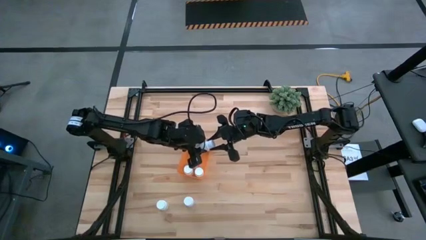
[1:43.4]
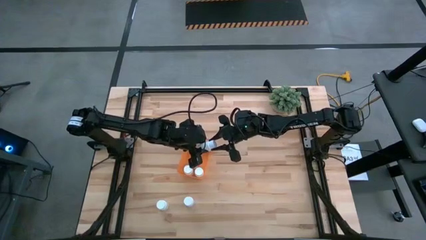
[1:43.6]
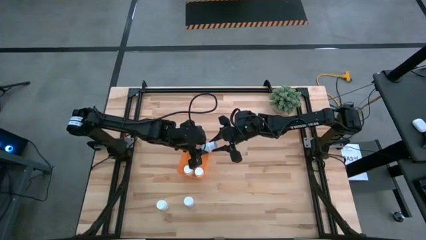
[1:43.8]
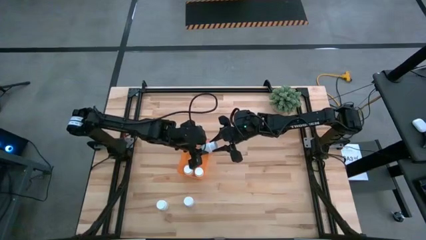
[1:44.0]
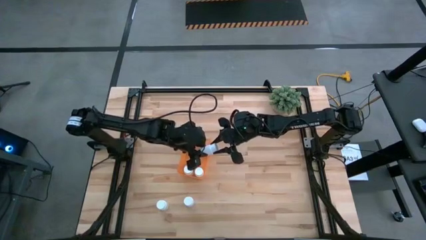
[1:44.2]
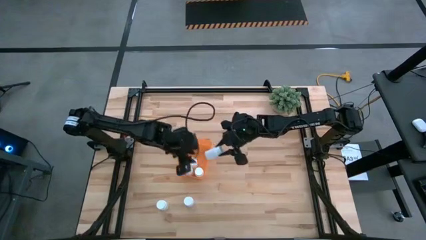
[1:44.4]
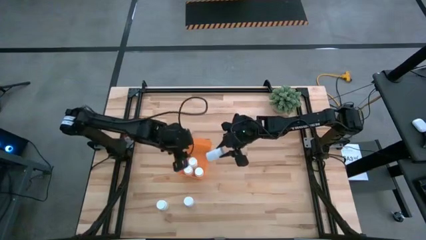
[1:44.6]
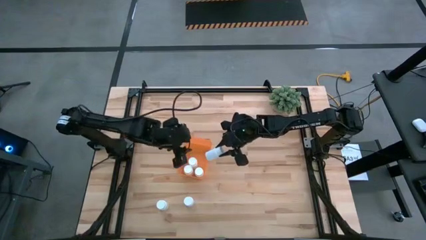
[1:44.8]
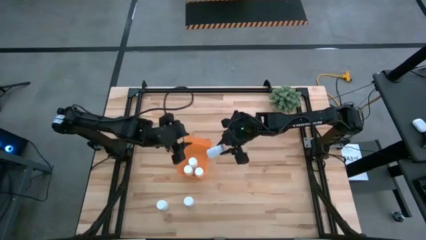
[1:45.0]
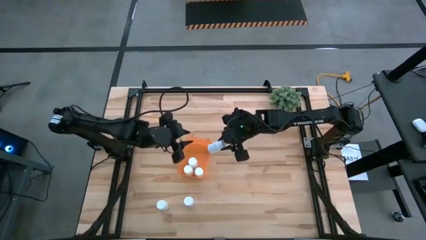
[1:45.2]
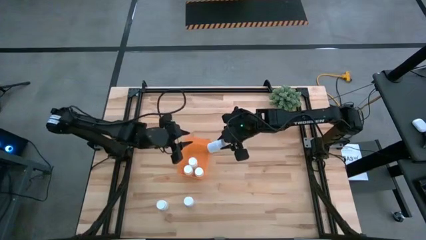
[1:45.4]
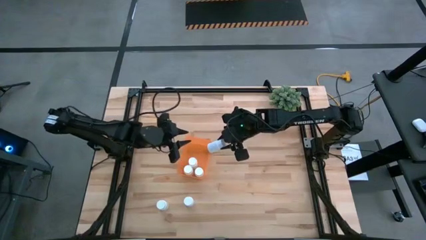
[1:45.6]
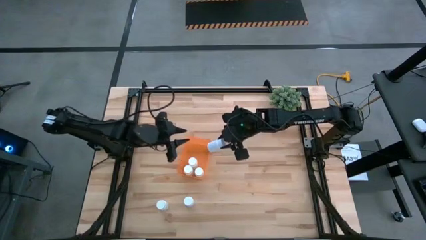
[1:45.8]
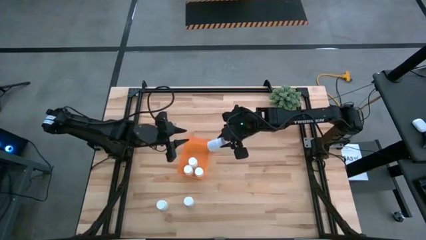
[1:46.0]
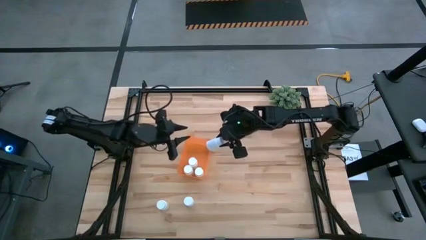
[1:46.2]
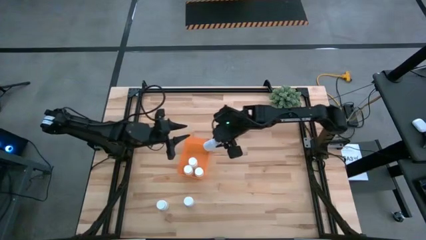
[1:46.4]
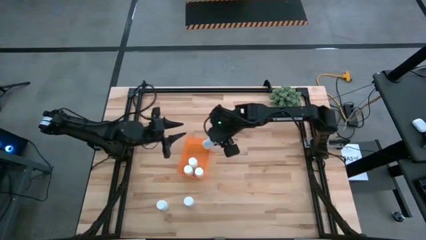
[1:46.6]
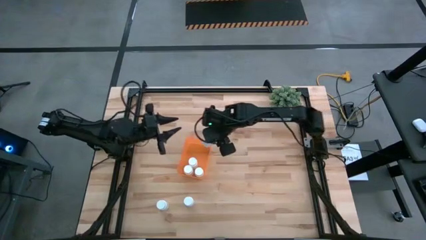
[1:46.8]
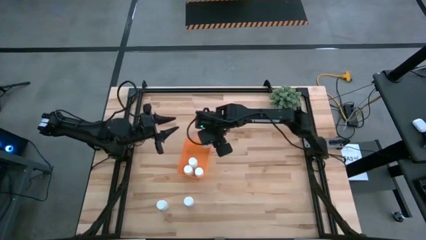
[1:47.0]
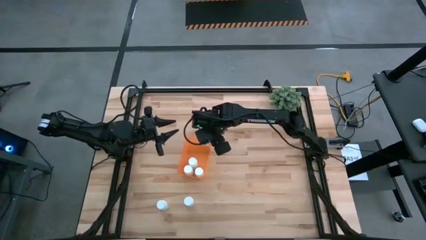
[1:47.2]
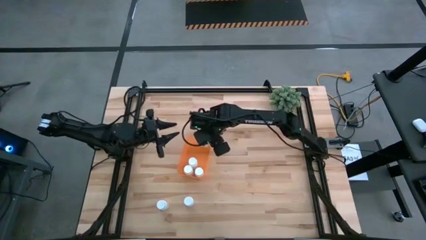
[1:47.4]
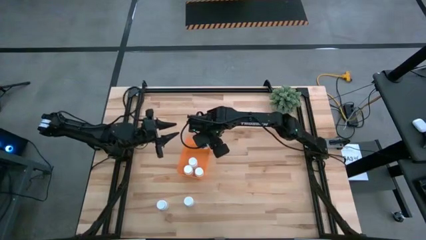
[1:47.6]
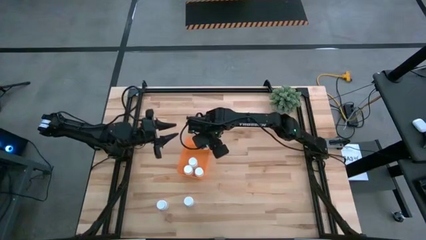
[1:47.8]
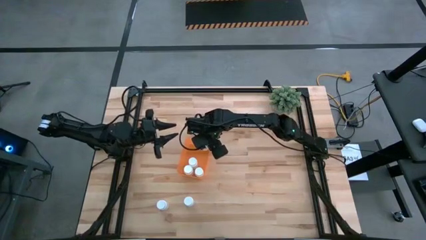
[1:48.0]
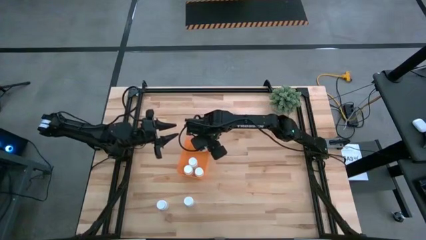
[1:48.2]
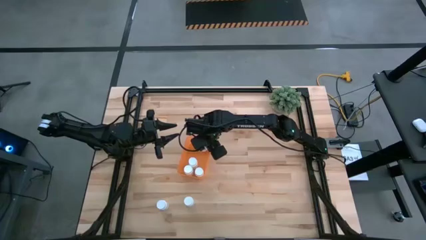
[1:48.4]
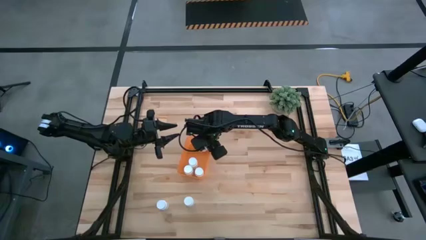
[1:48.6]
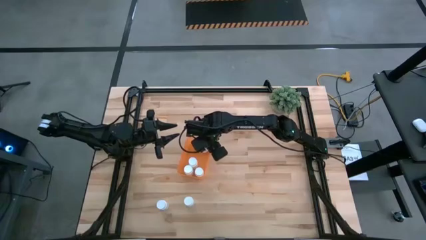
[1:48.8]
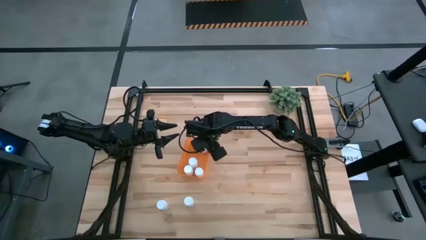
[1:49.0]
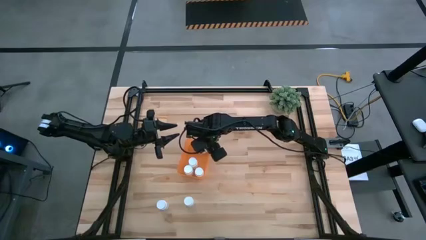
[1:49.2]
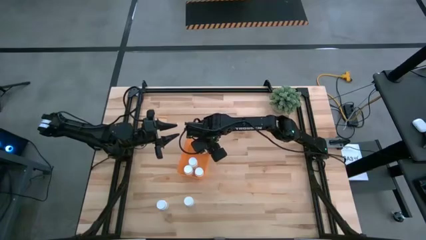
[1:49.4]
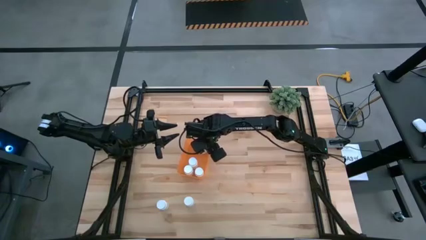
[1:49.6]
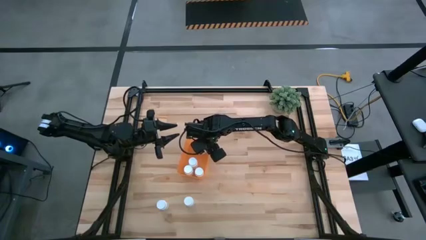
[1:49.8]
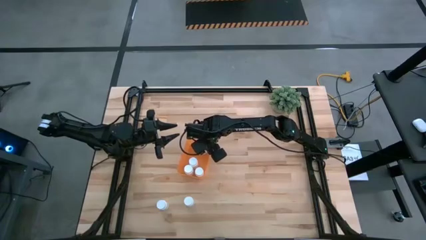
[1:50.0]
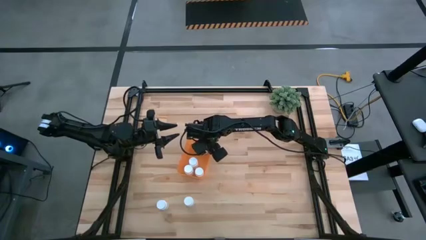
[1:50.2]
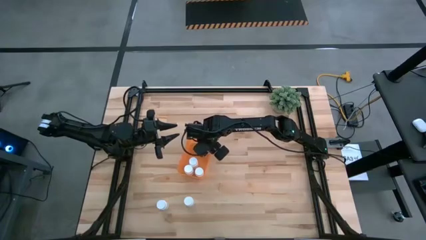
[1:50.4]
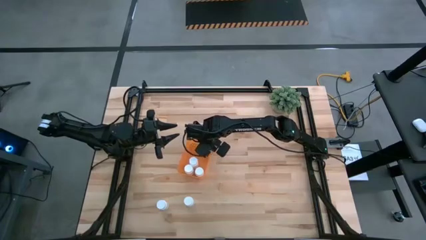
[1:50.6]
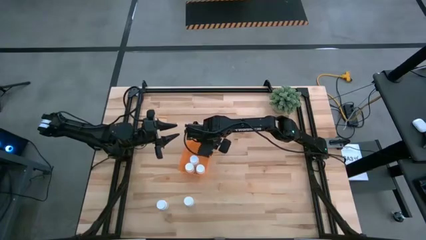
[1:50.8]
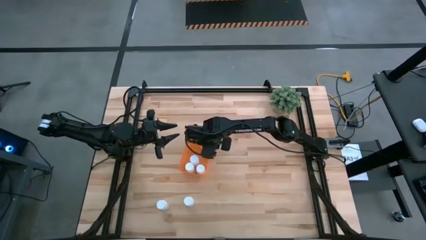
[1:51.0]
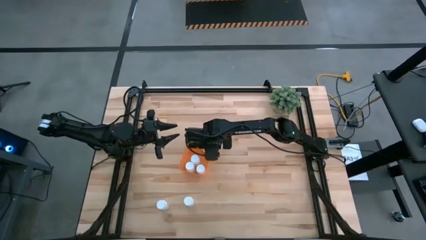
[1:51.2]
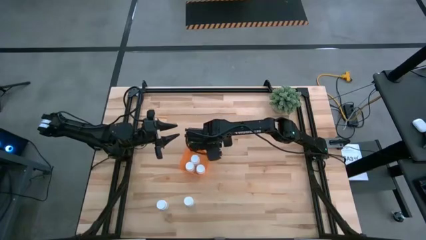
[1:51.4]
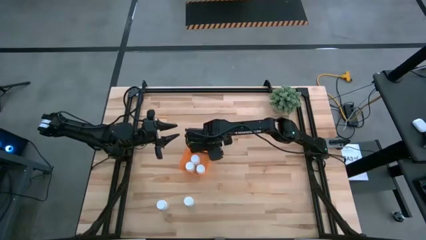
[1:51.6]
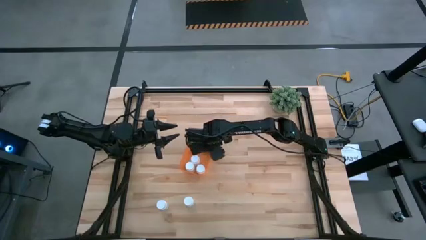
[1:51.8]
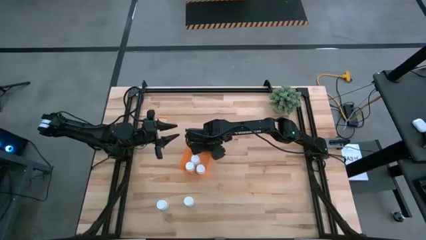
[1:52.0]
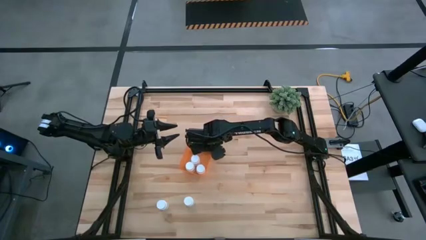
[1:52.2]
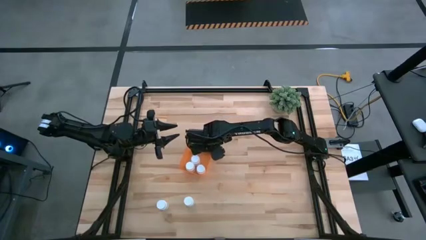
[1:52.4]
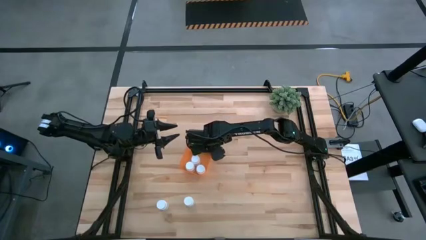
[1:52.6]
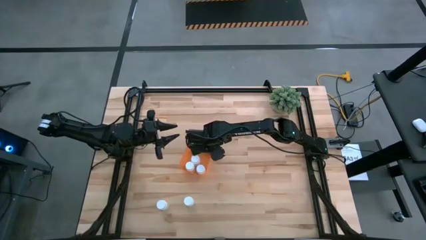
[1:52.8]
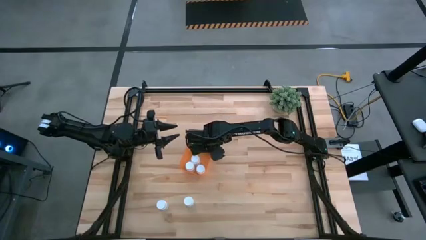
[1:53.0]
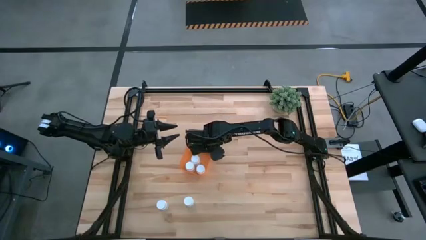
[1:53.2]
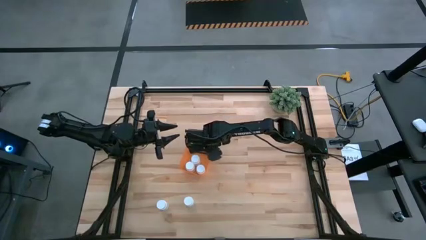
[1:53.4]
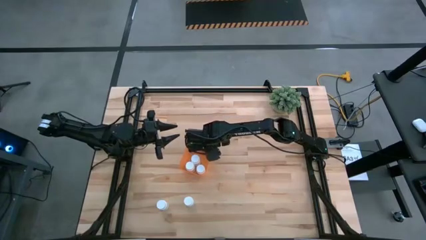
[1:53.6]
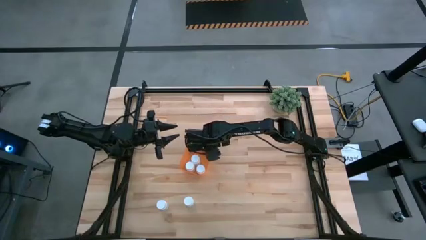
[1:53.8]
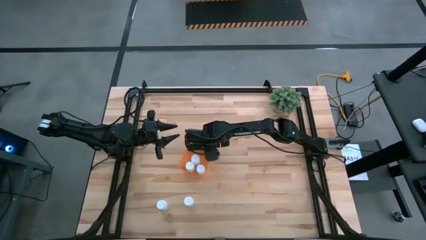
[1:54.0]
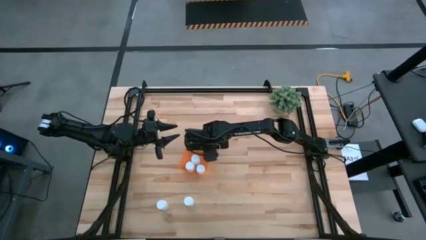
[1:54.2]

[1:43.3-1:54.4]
Task: Pick and place pill bottles into a basket
Put the top right white medicine bottle into the orange bin
